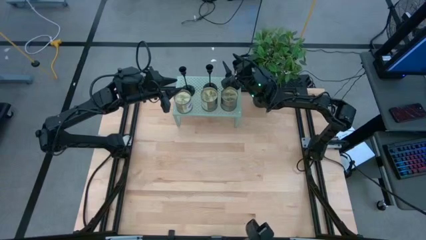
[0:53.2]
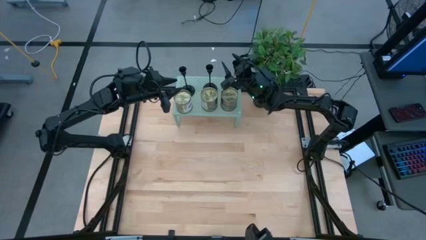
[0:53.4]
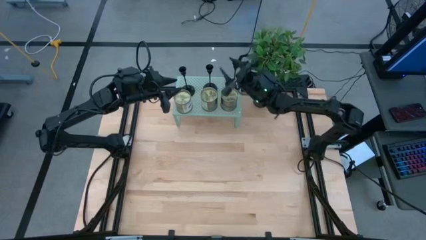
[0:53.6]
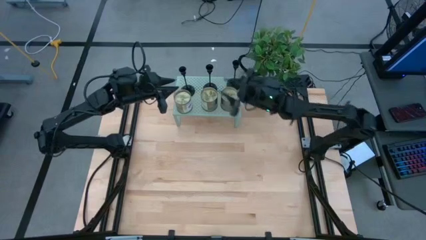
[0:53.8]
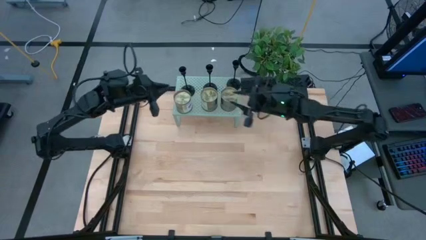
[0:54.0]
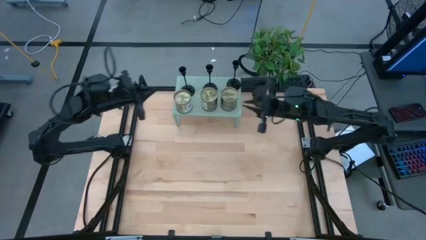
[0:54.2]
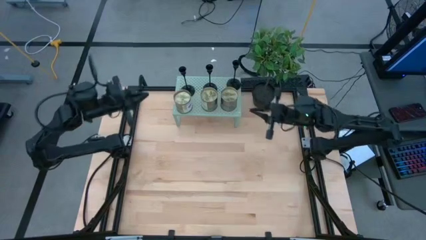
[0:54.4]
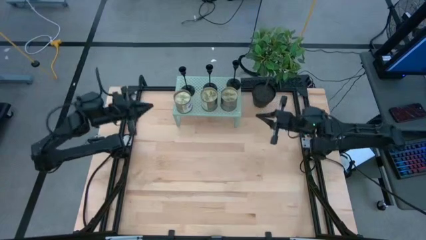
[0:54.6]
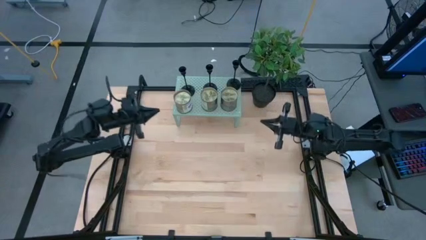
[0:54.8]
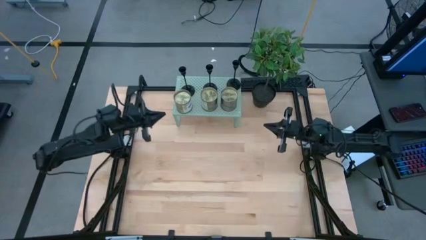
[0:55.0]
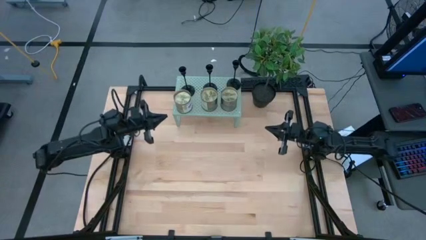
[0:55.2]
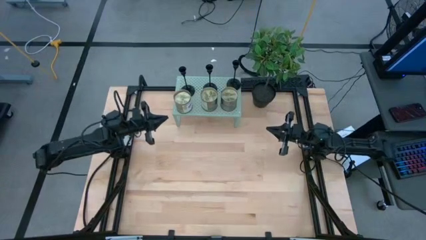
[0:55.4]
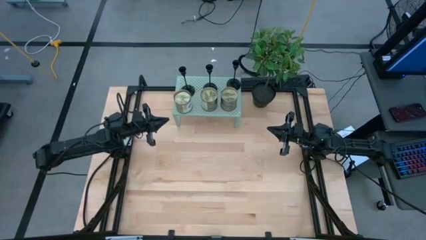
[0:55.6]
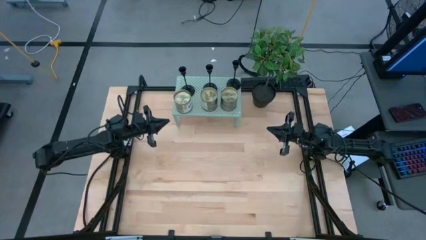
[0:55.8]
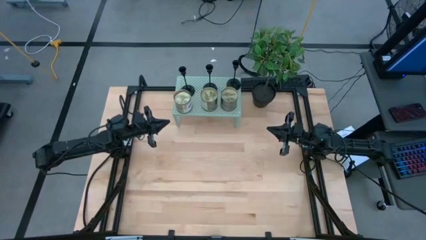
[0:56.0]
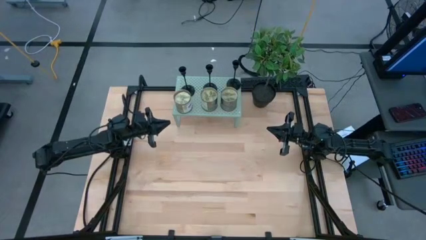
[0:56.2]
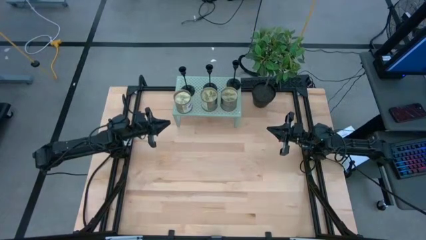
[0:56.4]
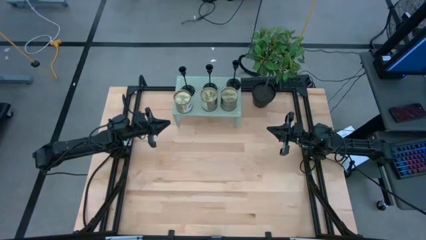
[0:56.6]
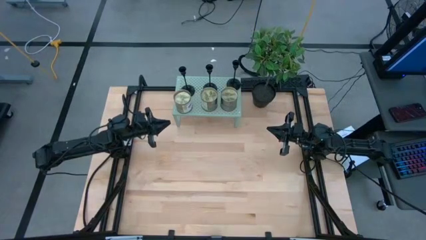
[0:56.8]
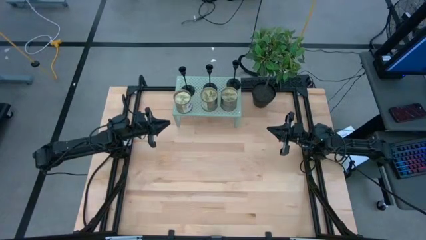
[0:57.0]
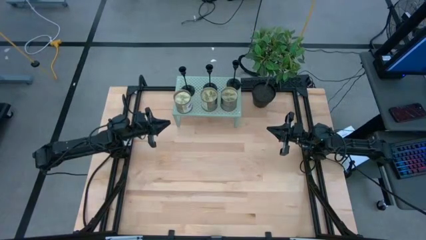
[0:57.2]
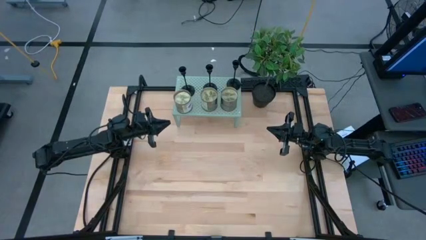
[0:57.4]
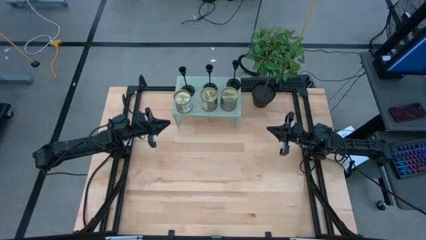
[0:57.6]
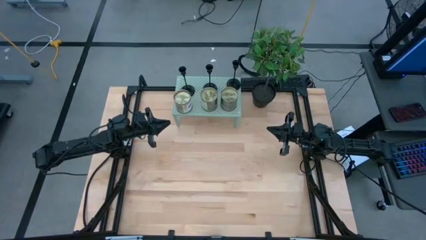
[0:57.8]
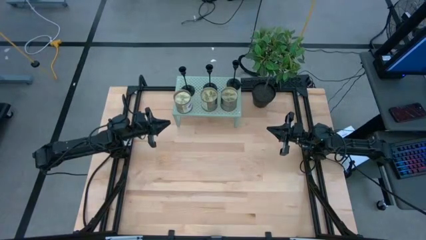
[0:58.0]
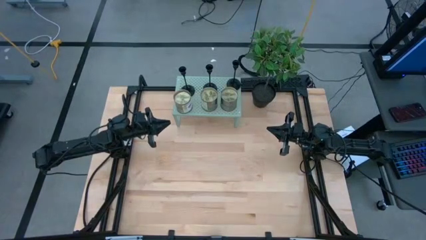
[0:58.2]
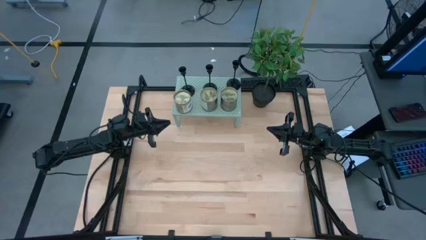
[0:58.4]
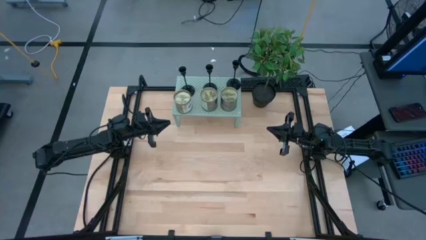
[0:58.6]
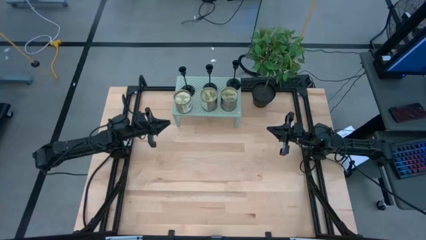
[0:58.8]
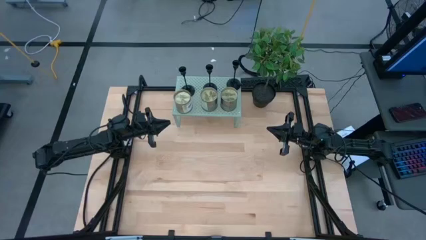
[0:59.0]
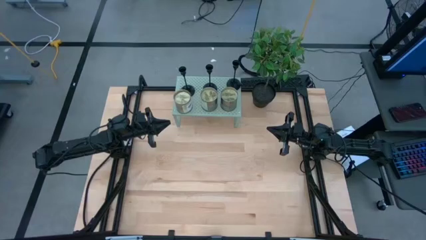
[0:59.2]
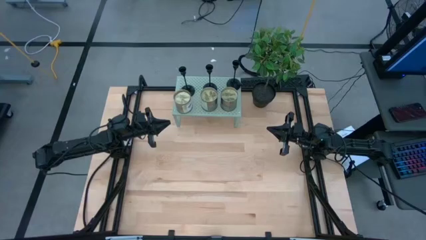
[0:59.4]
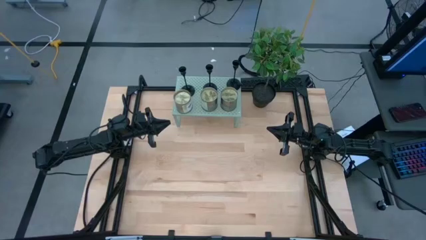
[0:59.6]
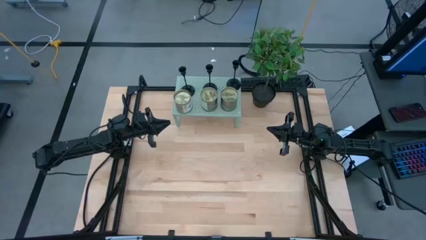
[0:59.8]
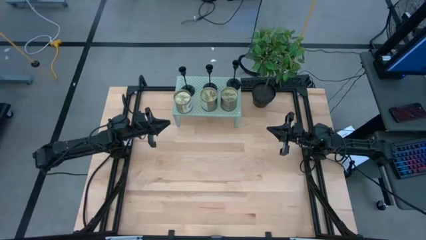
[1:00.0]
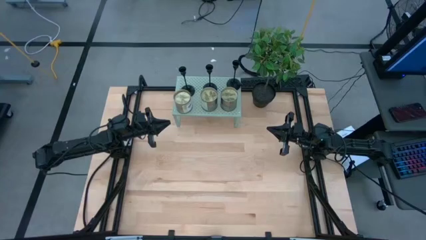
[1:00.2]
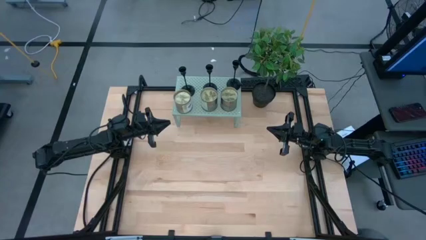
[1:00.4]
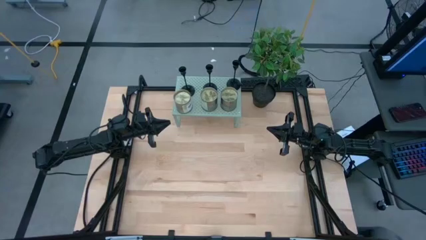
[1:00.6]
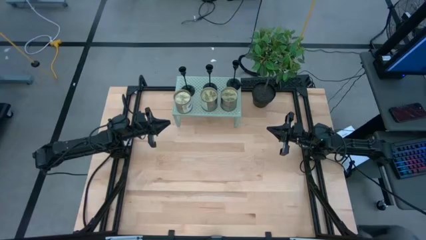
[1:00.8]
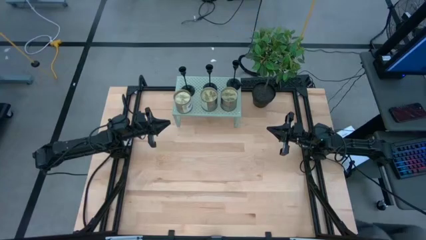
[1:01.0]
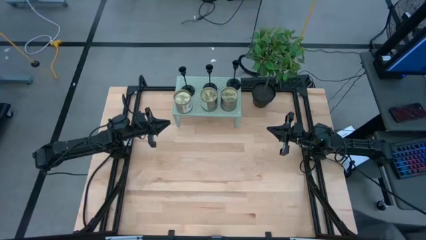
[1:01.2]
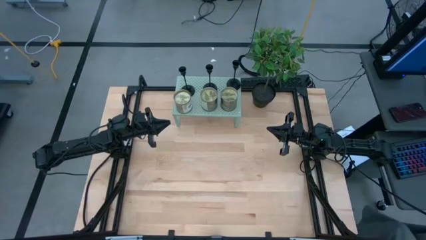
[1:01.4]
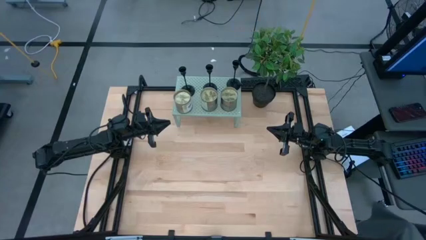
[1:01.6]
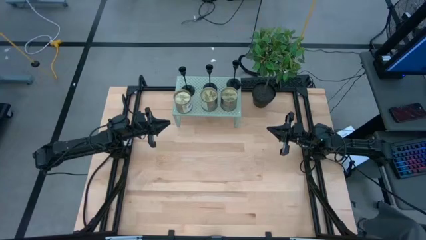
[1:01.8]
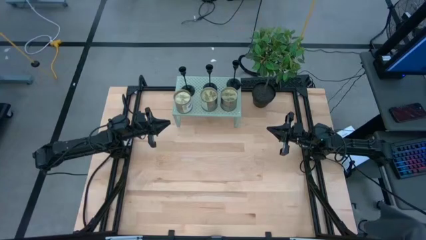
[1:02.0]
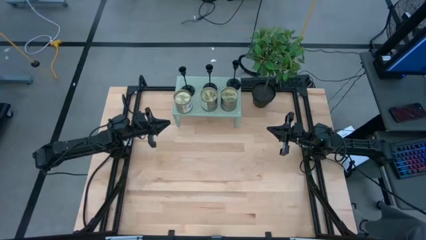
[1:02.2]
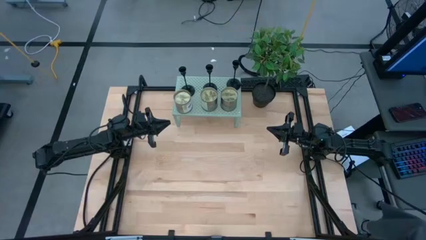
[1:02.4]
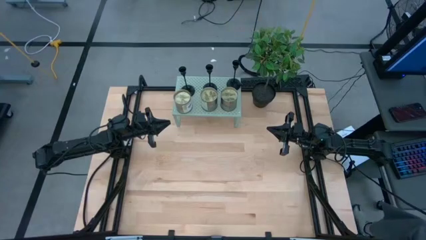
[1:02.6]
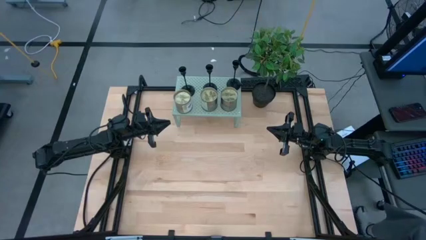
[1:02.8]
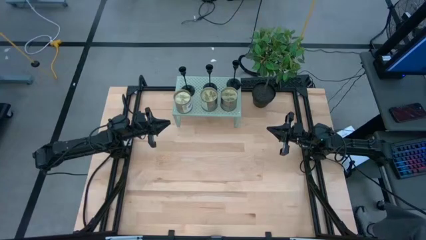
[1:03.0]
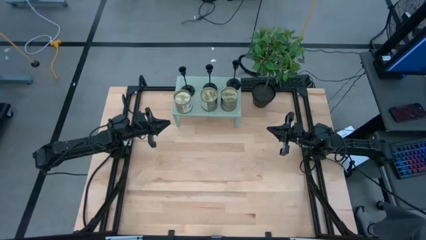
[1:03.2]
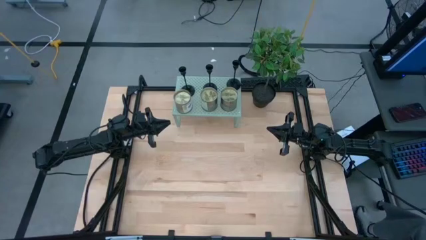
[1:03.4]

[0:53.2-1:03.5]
Task: Pick & Place candle stick holders
Return to Home Position
